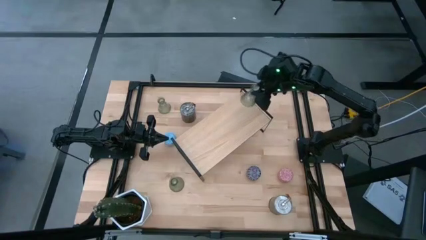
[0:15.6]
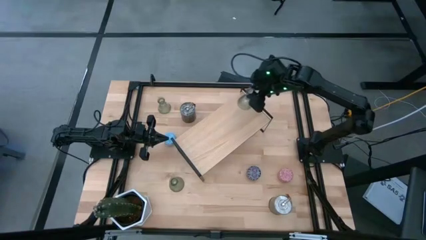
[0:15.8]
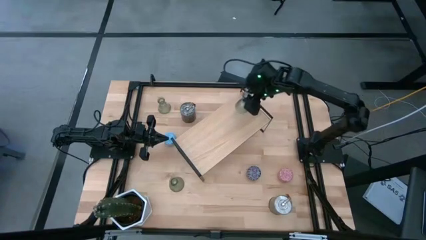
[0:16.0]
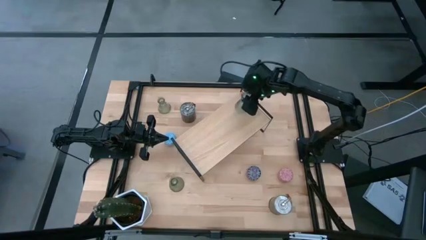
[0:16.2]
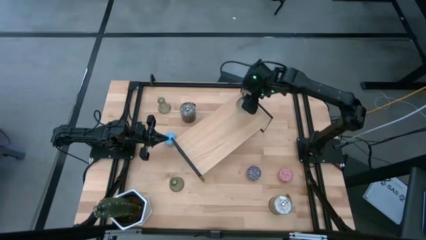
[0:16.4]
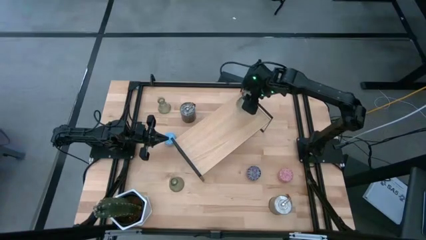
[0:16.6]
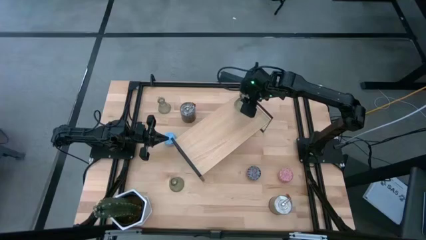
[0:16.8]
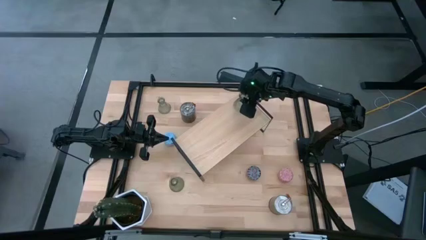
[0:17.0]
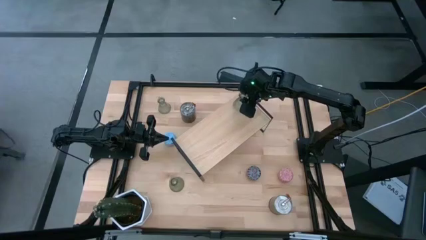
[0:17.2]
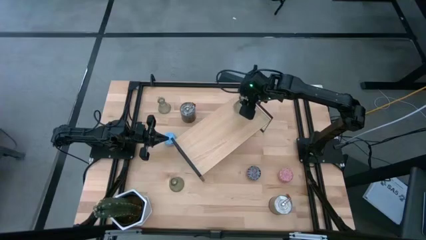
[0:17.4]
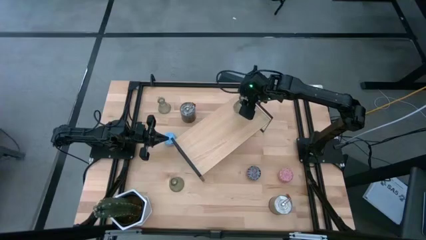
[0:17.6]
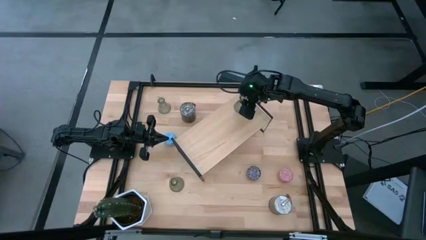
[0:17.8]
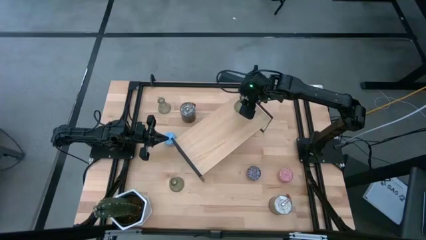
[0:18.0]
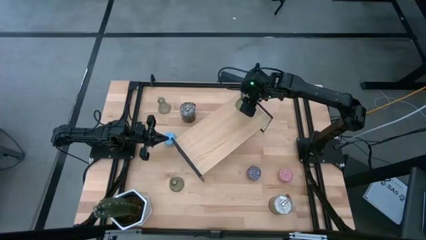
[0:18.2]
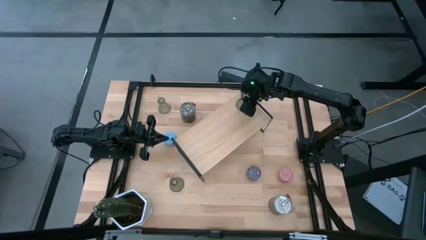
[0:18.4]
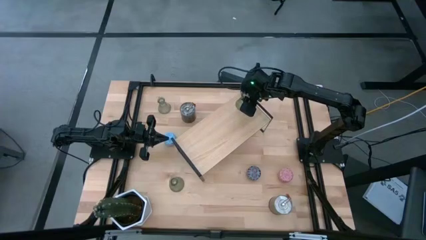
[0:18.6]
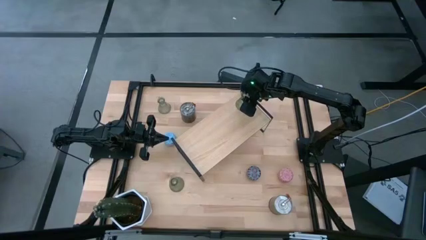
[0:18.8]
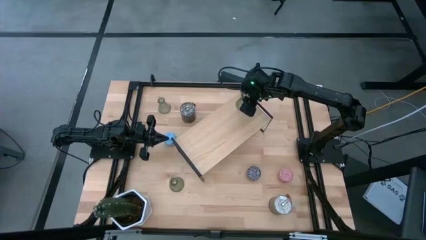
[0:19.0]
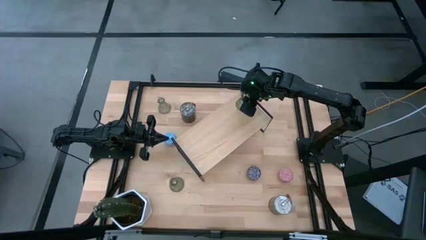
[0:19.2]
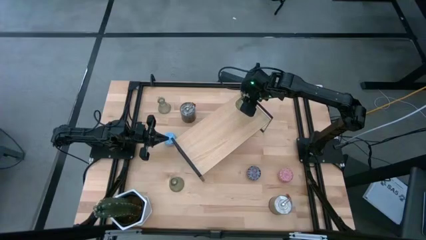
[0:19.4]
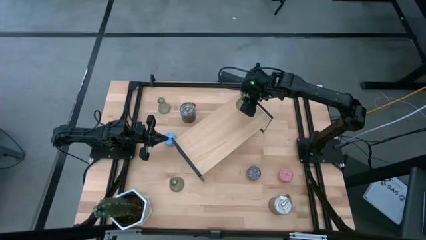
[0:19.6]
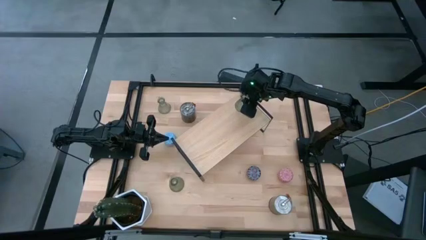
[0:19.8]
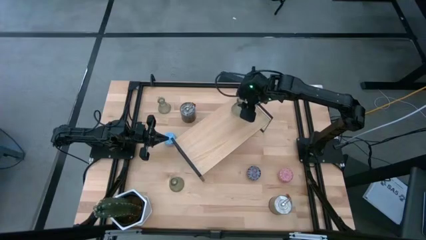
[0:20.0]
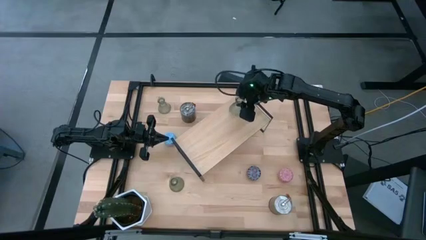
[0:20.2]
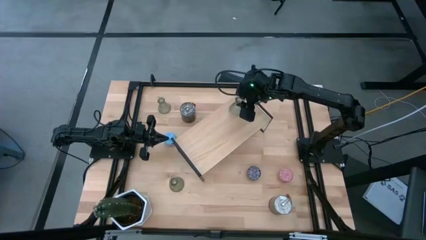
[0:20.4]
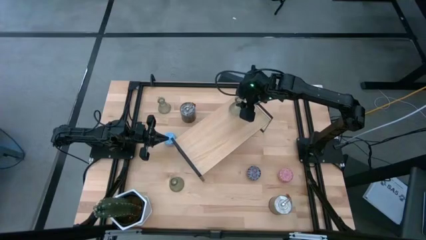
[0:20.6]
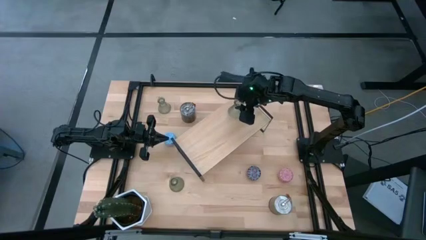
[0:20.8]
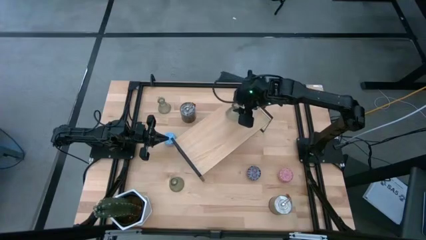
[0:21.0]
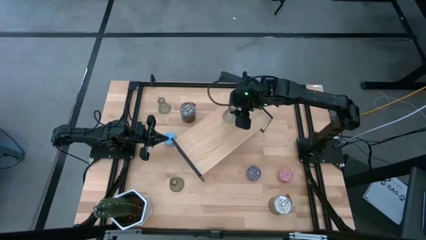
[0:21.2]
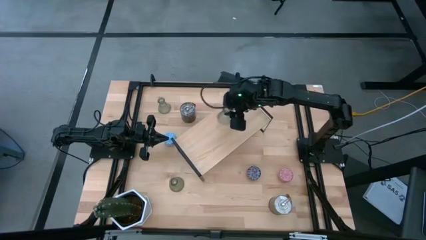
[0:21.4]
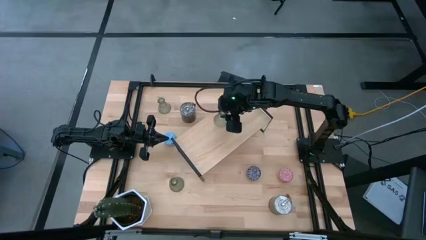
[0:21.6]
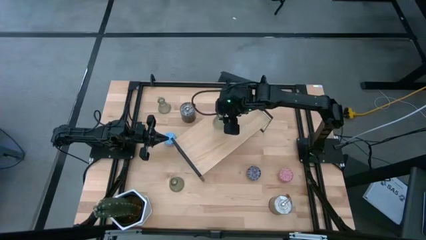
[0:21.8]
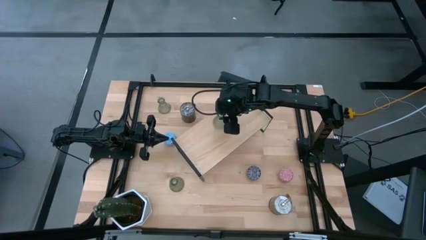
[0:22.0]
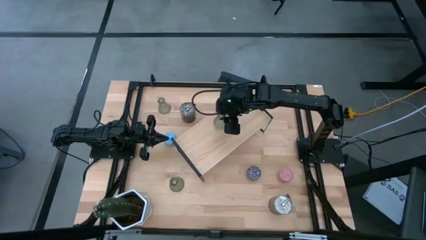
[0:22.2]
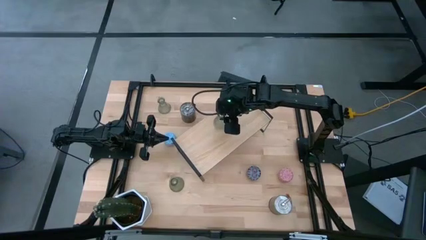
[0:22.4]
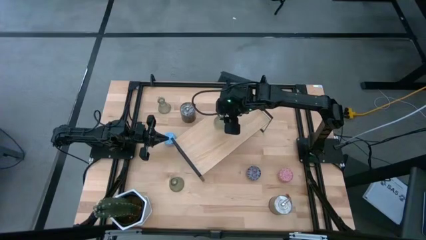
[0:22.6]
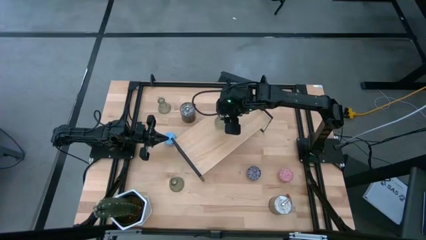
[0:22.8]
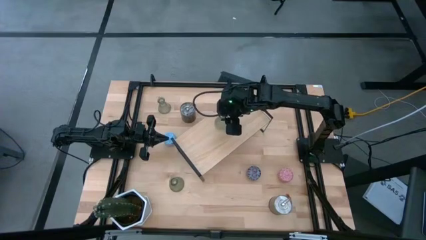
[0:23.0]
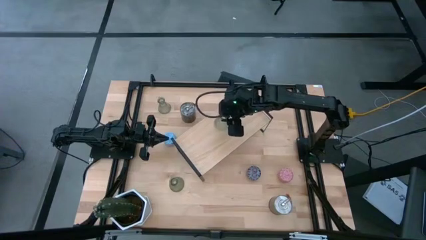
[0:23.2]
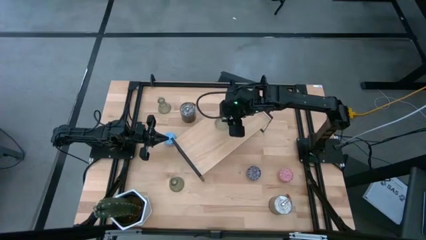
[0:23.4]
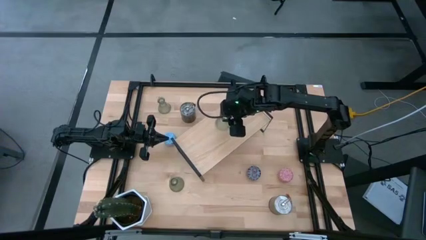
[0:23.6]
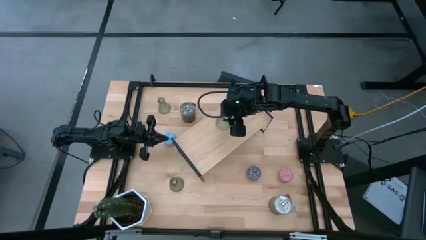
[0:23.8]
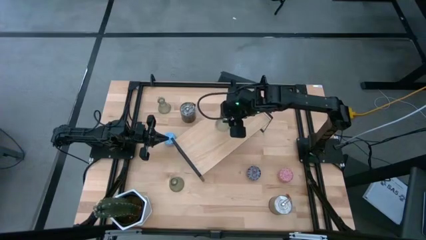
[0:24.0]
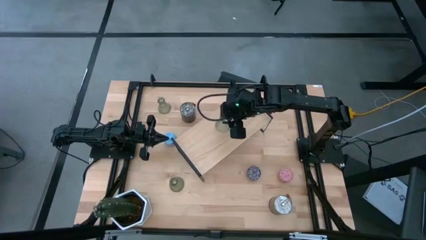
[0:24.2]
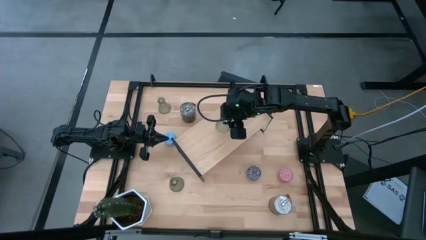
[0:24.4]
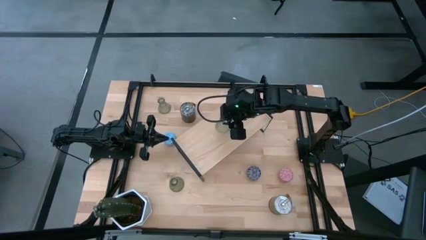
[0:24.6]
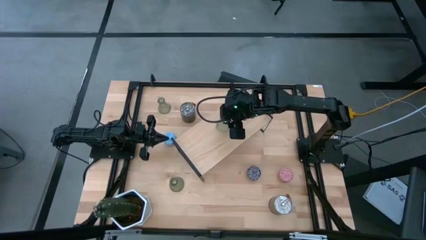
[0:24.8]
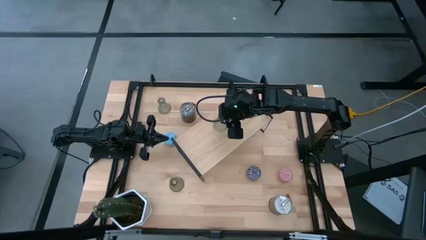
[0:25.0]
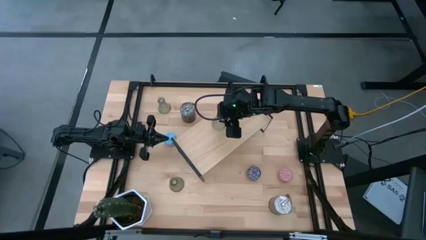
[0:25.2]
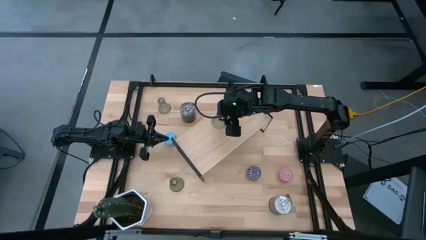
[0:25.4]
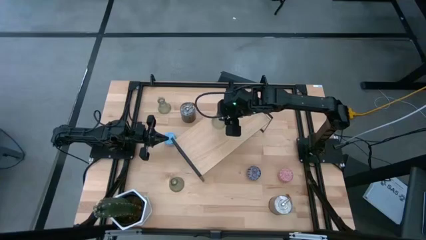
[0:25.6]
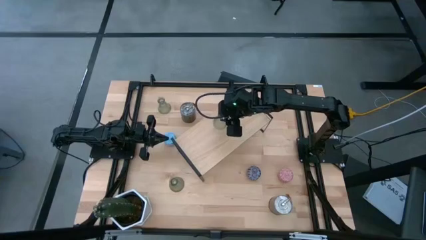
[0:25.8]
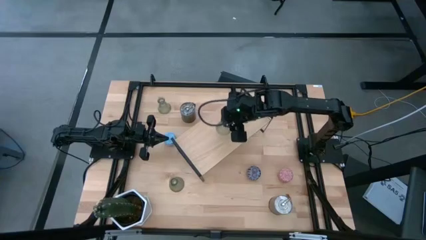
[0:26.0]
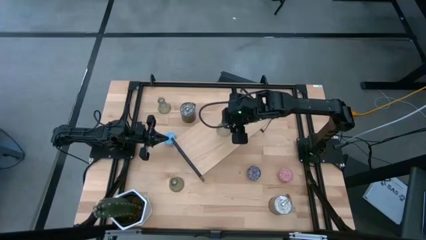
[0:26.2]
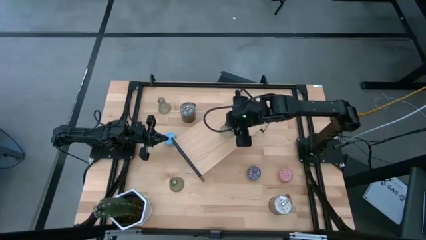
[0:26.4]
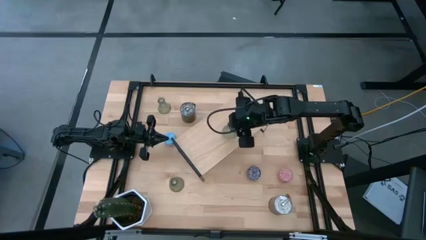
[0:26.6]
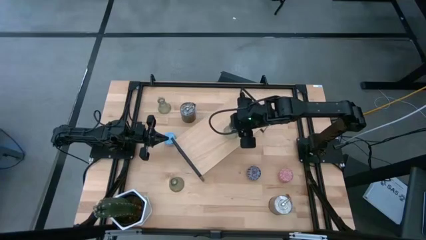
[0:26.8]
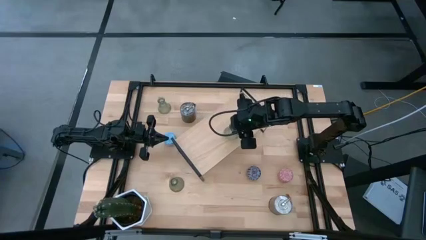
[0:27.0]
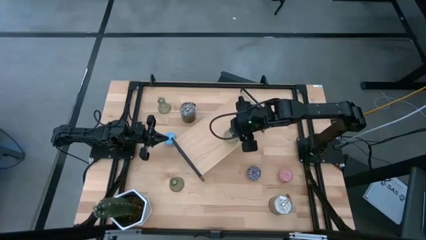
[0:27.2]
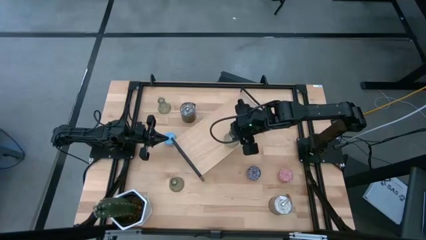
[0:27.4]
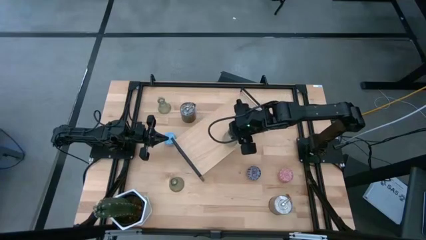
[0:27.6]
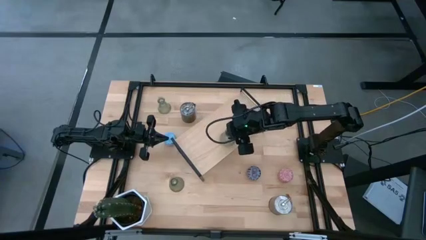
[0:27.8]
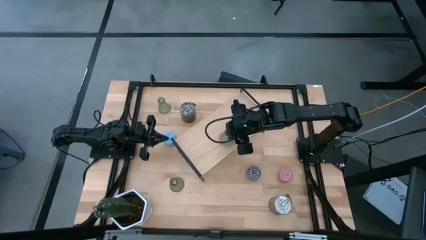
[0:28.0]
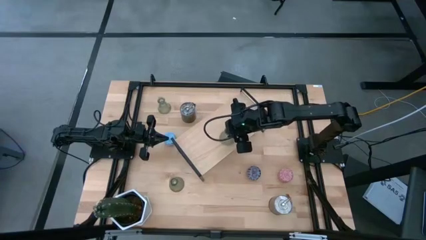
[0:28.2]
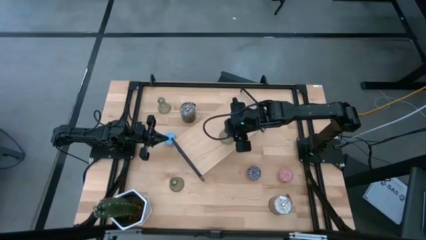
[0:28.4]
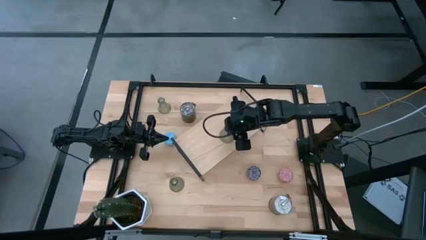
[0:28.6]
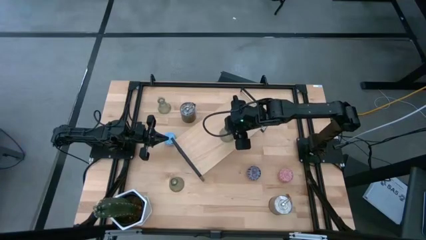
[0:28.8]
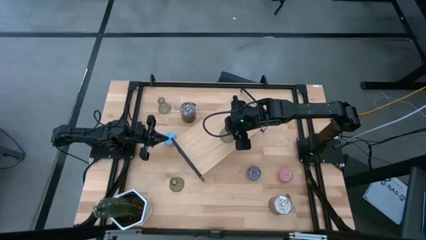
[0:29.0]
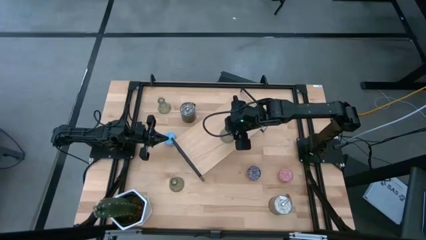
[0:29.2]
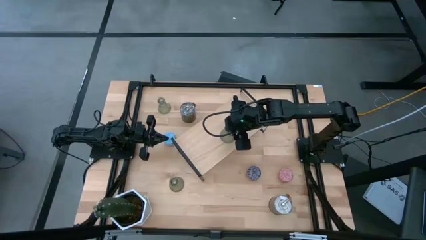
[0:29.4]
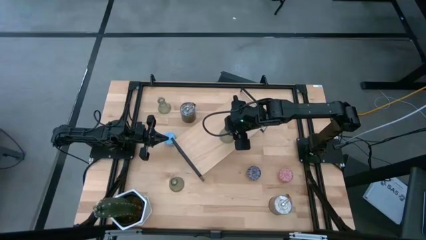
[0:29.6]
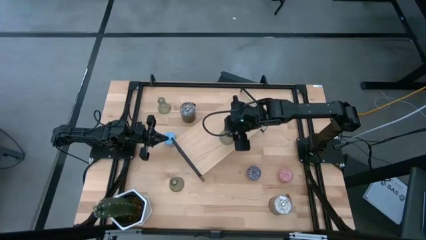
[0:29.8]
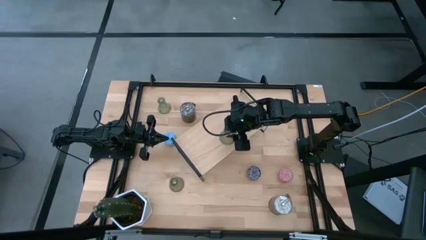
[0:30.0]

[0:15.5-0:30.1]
Task: Pick & Place candle stick holders
Put the top right transparent candle holder on the shelf

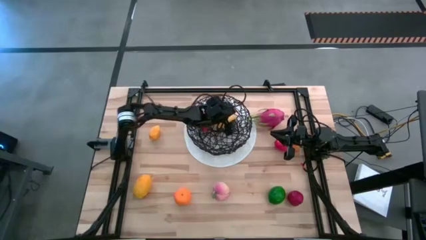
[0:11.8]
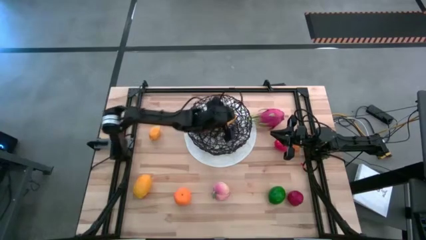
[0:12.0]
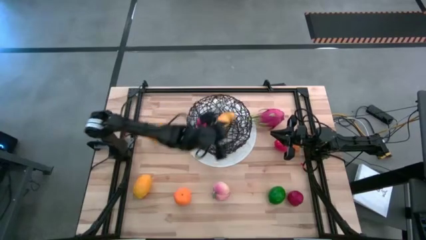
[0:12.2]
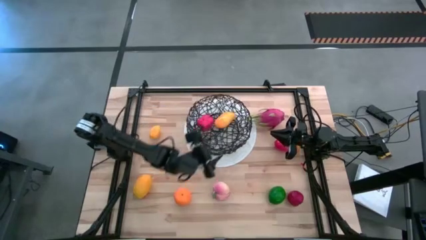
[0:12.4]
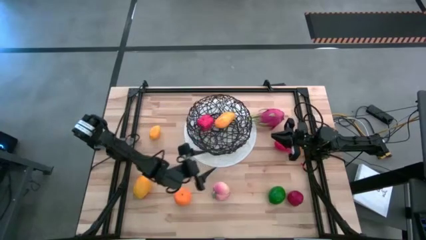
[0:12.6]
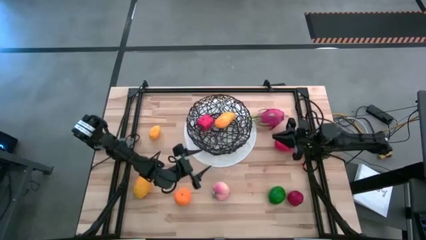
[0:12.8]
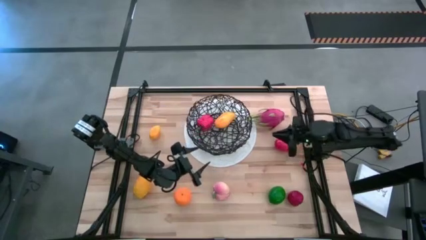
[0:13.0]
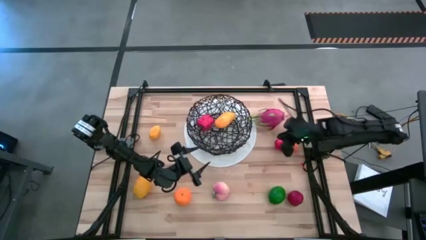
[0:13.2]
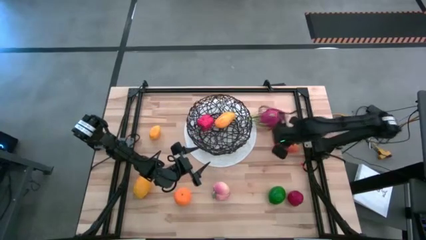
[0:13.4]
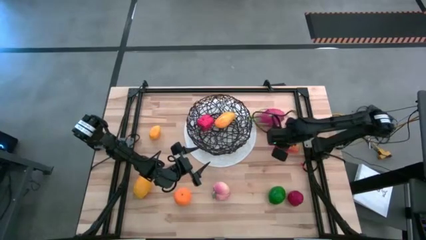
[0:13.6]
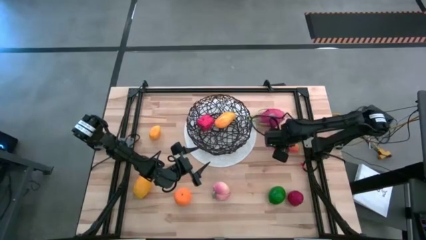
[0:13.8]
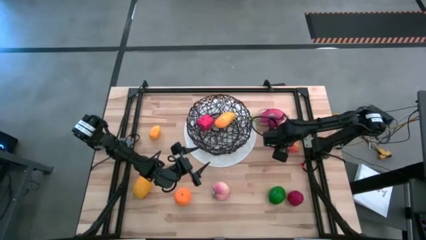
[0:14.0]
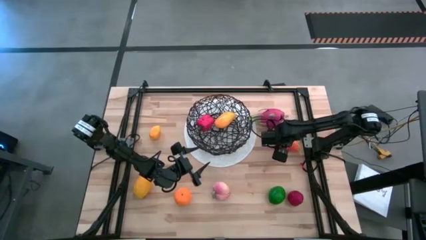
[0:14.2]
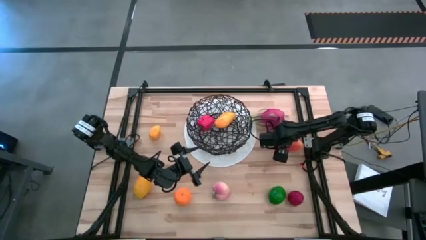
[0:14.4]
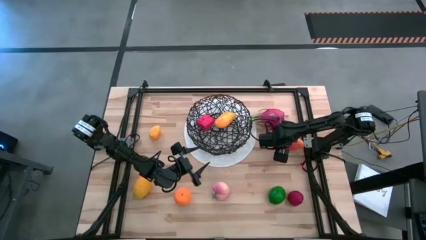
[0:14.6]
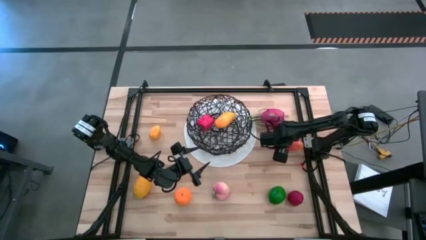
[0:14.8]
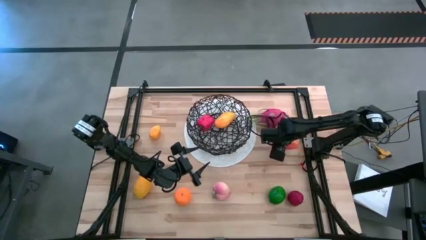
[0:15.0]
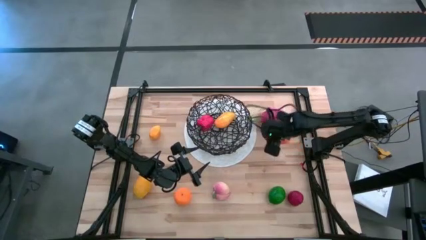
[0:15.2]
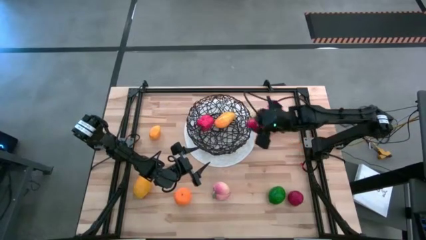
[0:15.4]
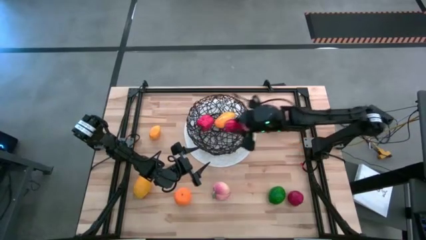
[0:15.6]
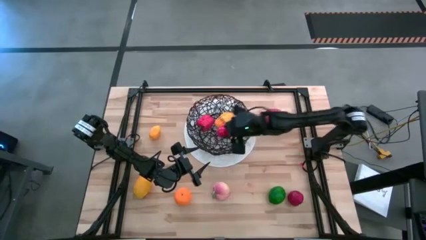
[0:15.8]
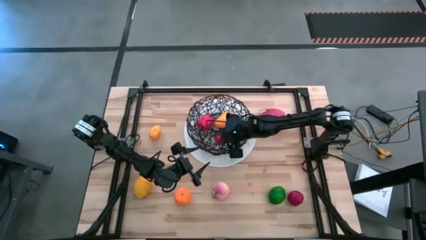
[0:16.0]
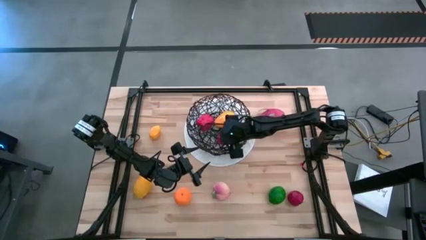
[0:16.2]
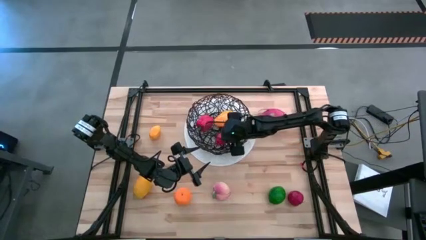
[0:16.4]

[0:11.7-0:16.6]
Task: Build produce basket
Put the red mango into the wire basket
